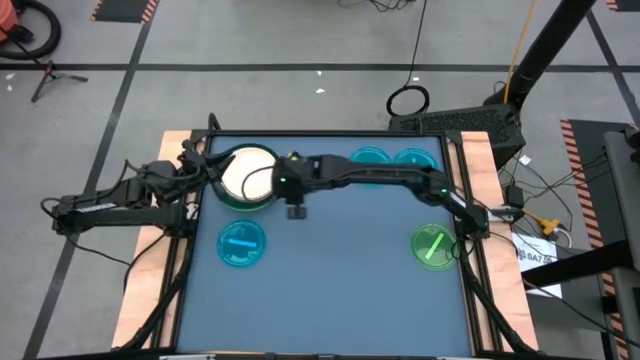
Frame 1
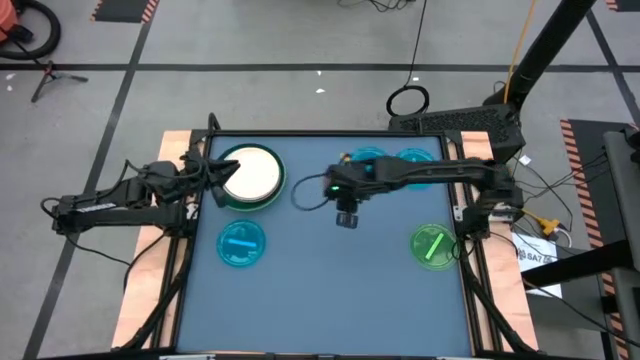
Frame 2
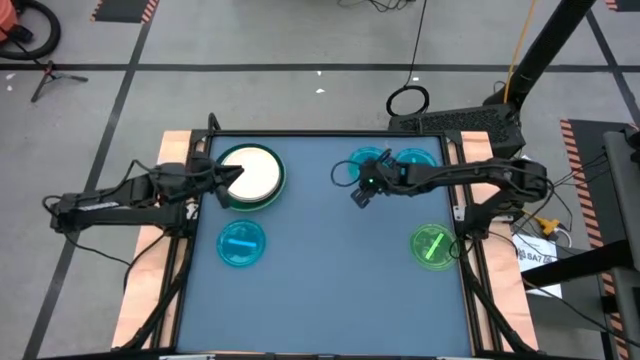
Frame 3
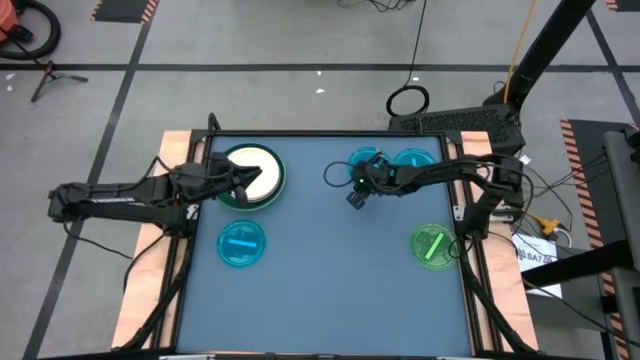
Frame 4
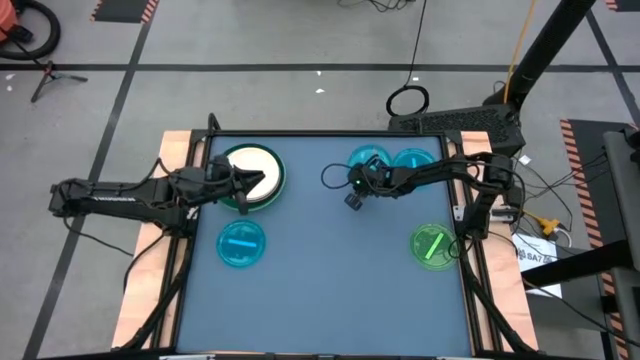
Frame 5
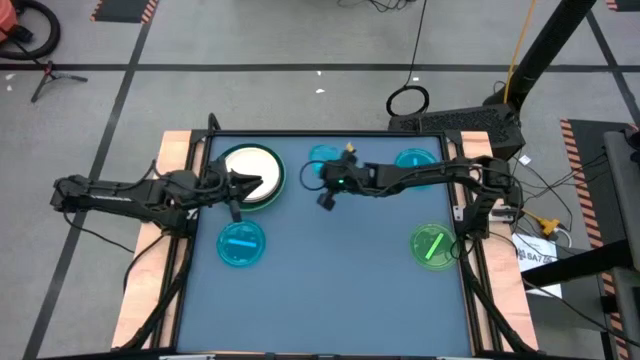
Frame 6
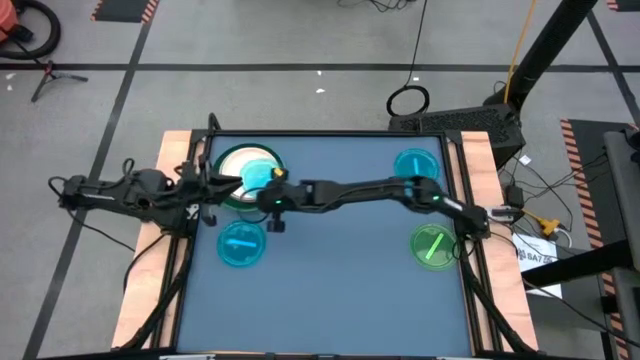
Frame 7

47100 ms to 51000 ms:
Task: Stack plastic plates
Stack the top left light blue plate on top of the light orange plate

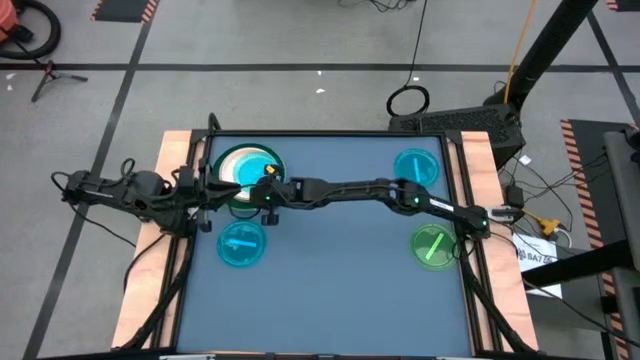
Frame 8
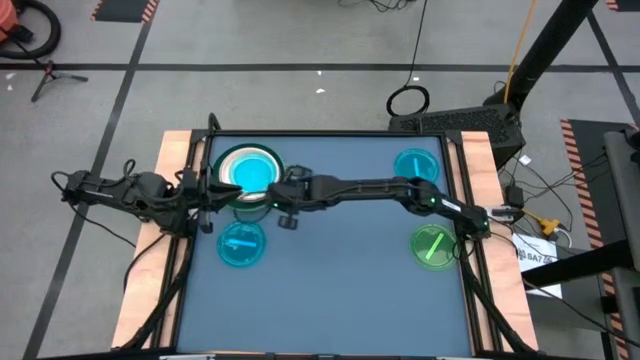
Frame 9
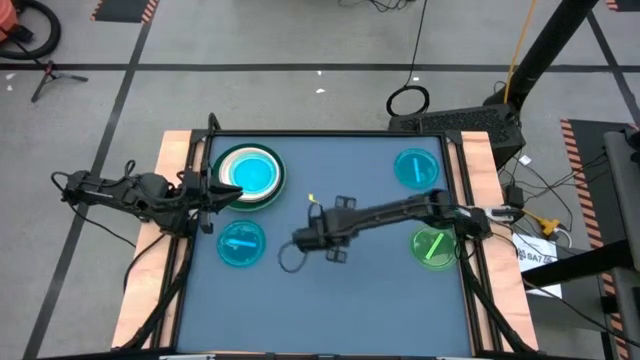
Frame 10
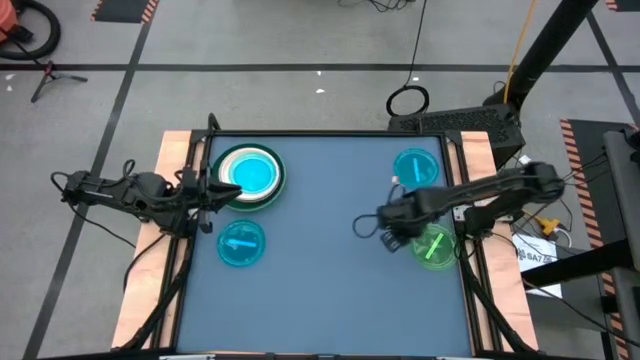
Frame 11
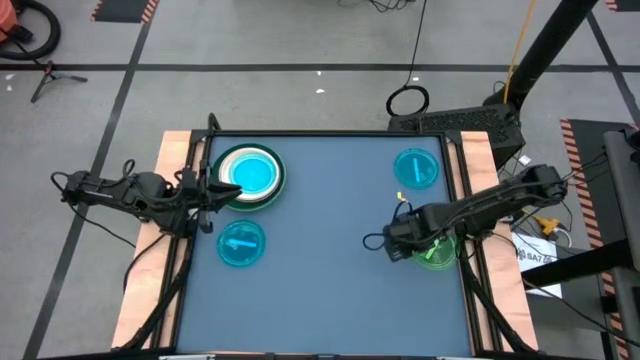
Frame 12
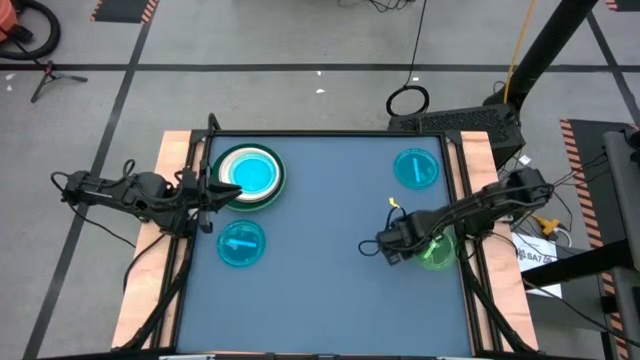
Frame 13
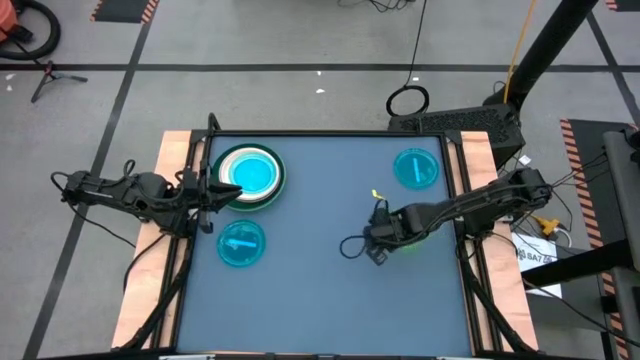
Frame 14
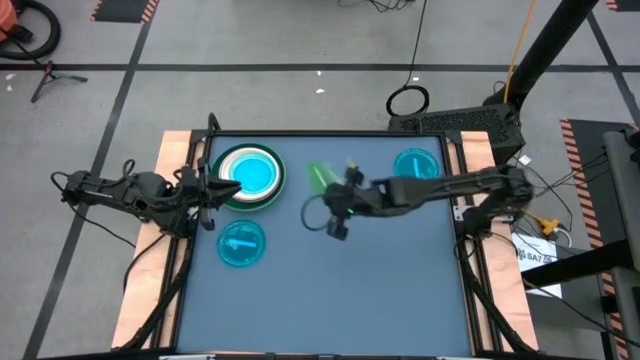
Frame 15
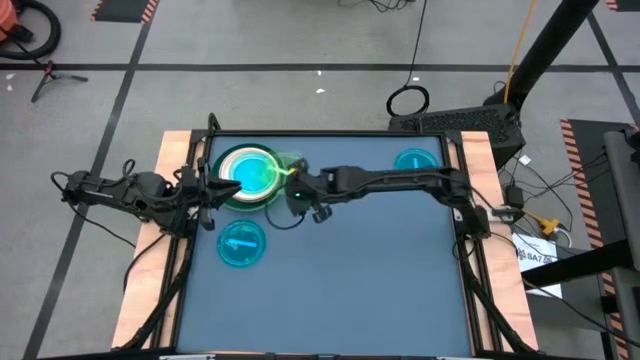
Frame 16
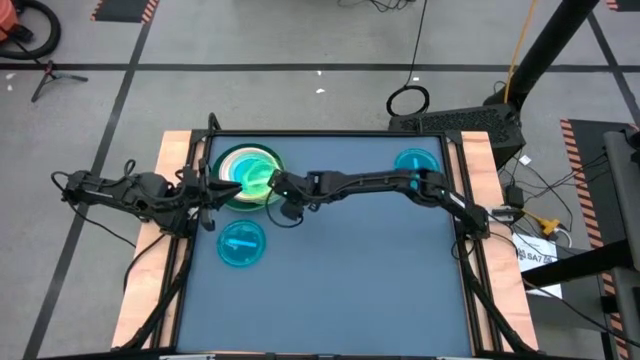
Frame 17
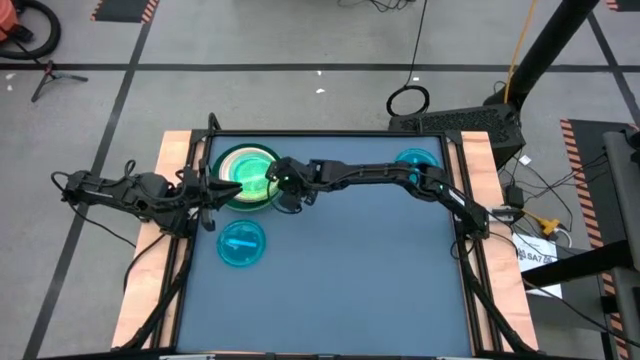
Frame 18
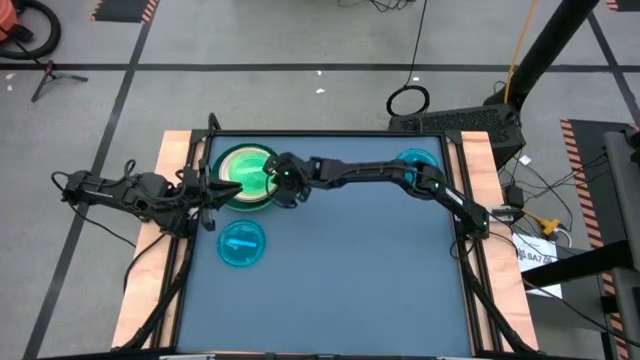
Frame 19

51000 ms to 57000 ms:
Stack the light green plate on top of the light blue plate

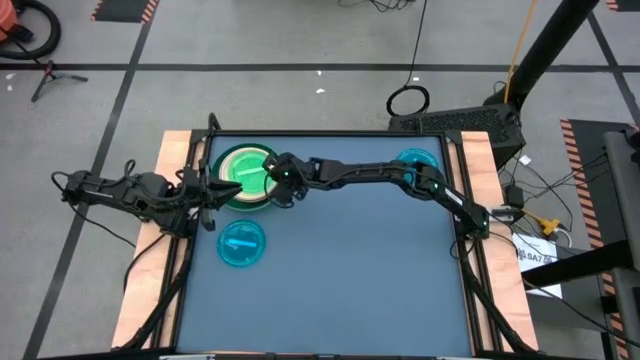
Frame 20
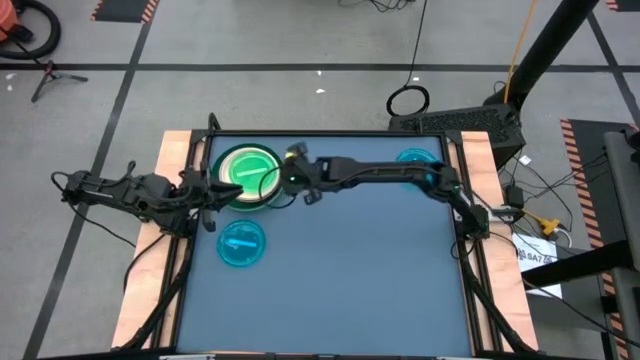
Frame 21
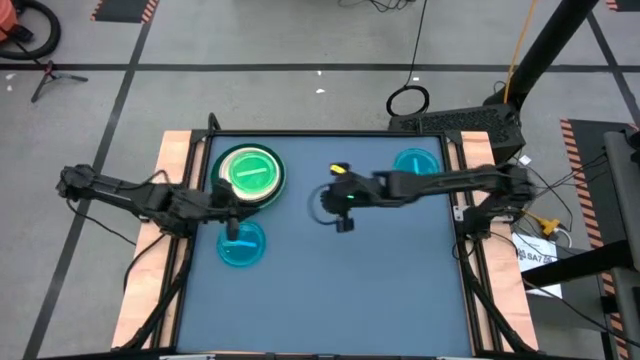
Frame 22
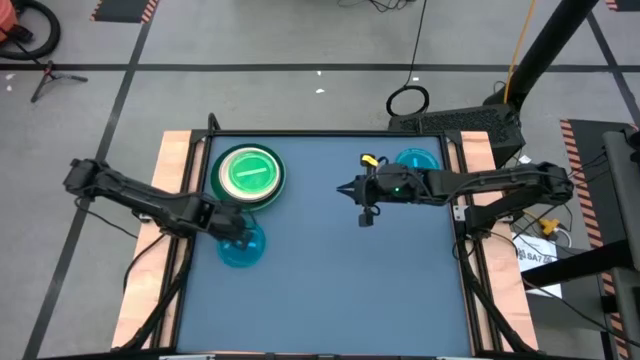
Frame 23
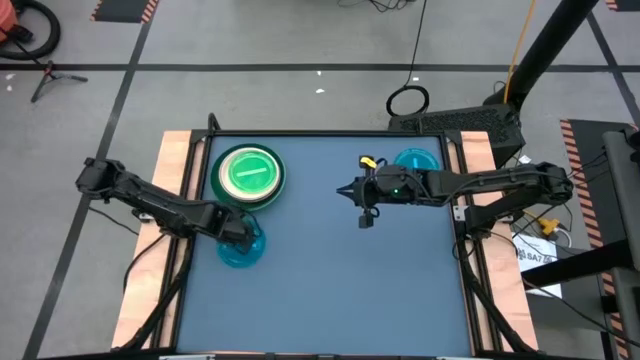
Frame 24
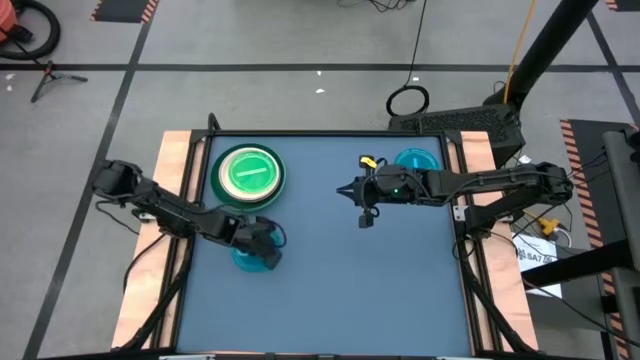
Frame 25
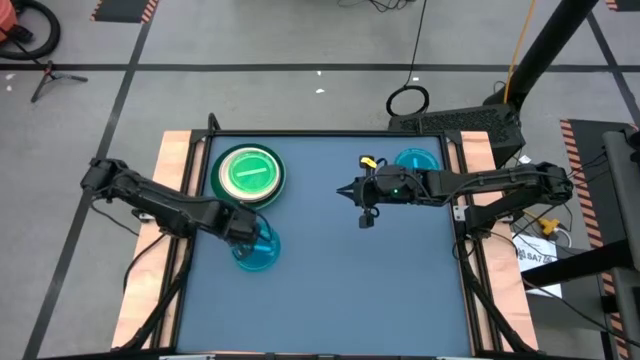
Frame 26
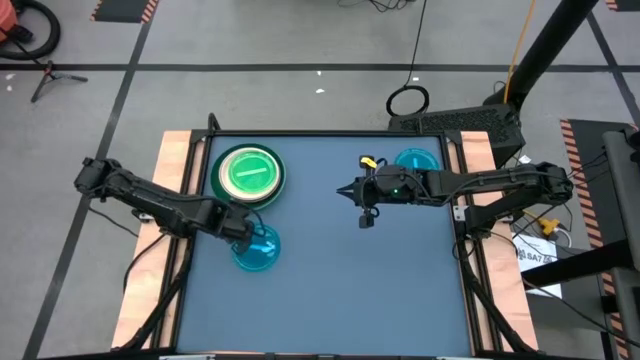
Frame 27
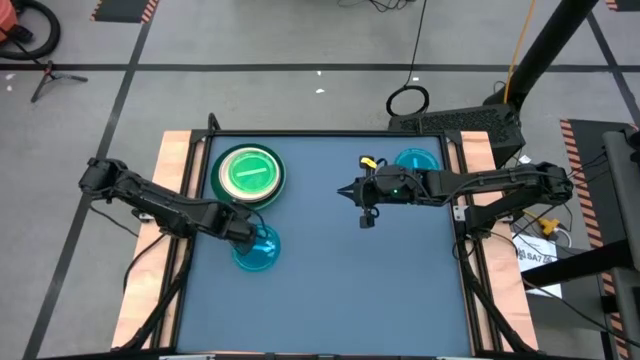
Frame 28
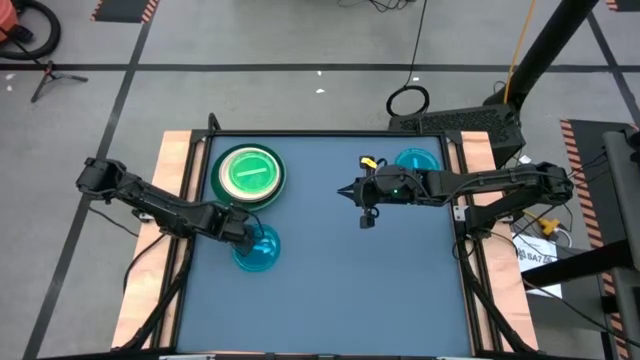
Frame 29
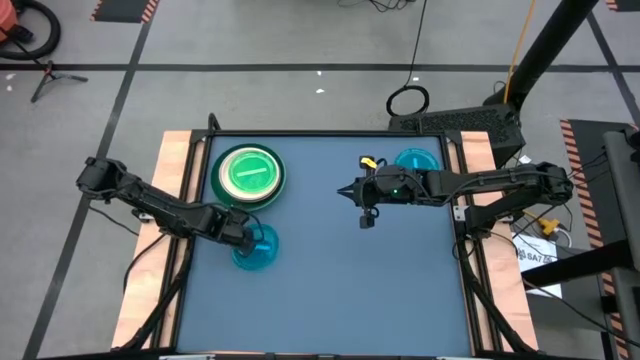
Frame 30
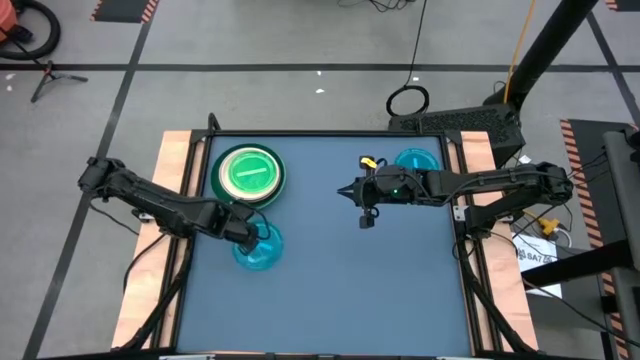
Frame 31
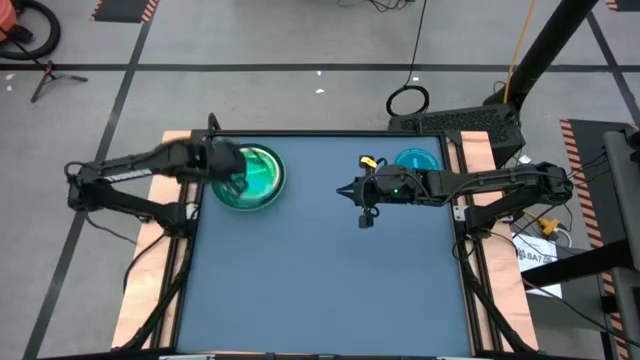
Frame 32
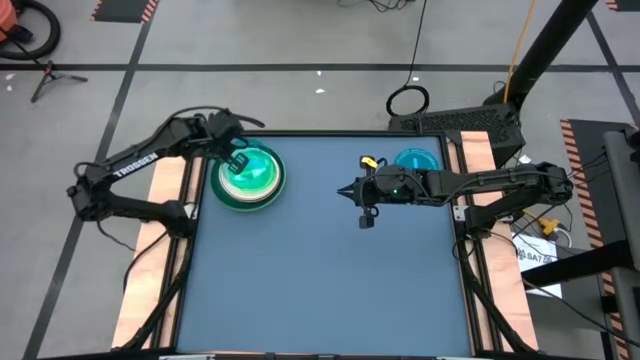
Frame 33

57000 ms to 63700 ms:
Stack the bottom light blue plate on top of the light green plate

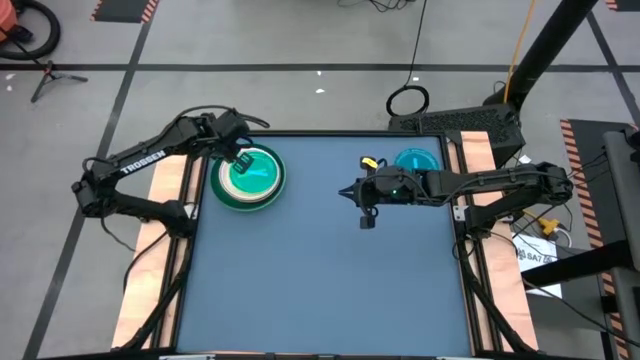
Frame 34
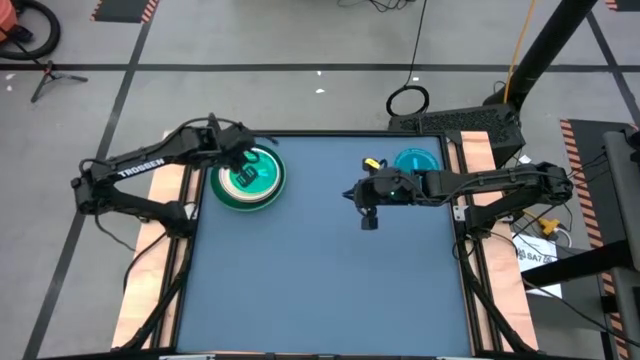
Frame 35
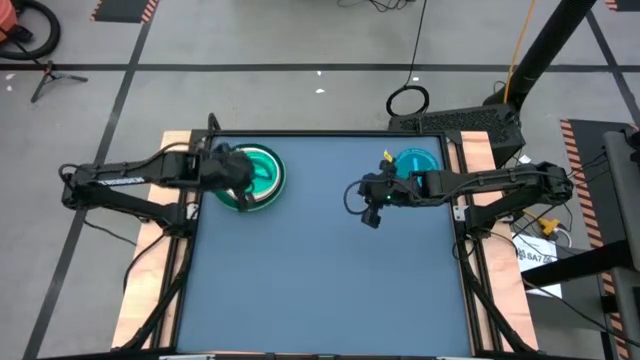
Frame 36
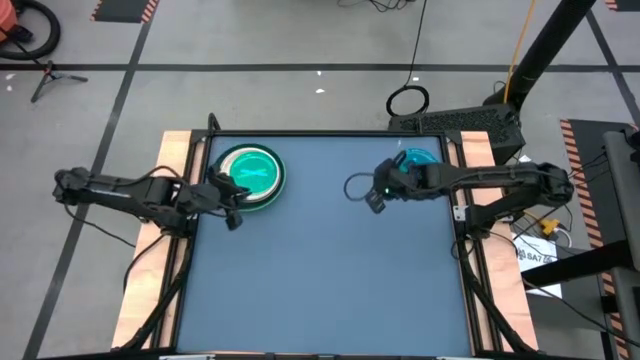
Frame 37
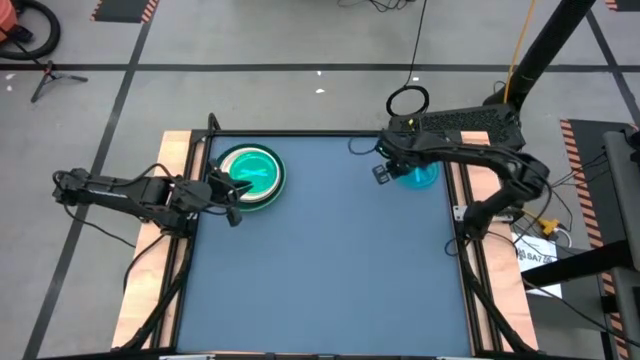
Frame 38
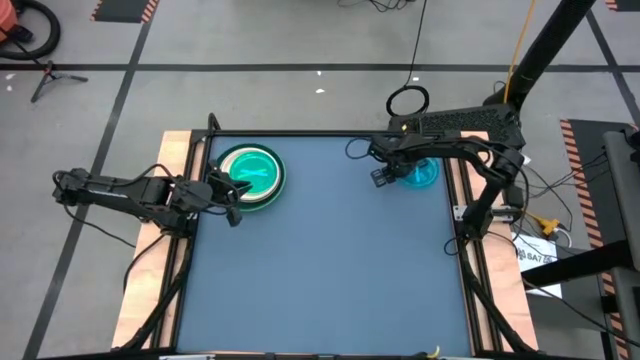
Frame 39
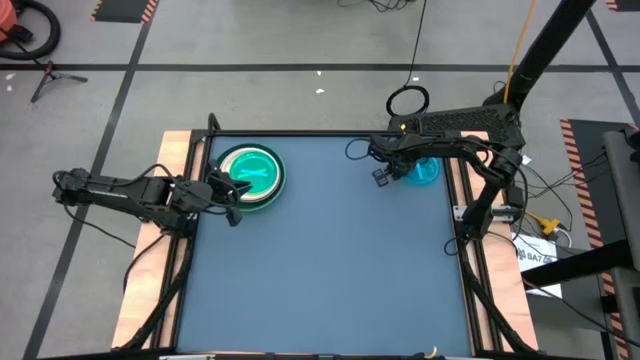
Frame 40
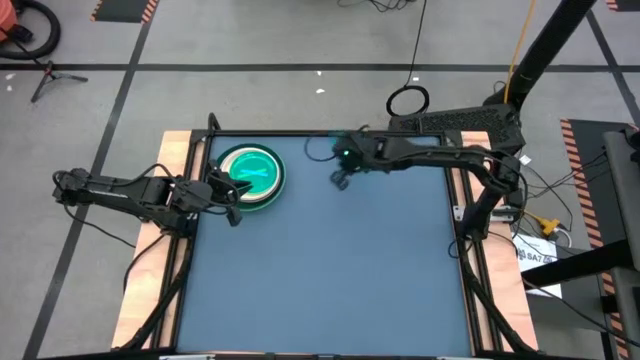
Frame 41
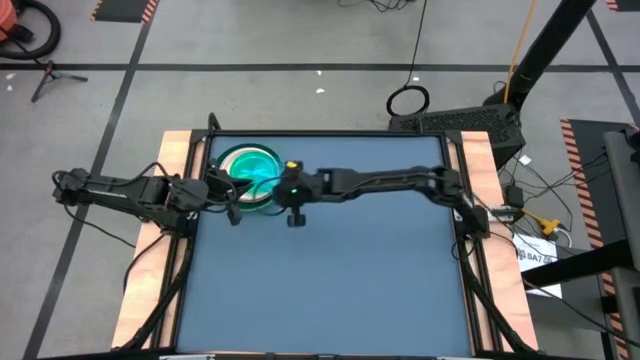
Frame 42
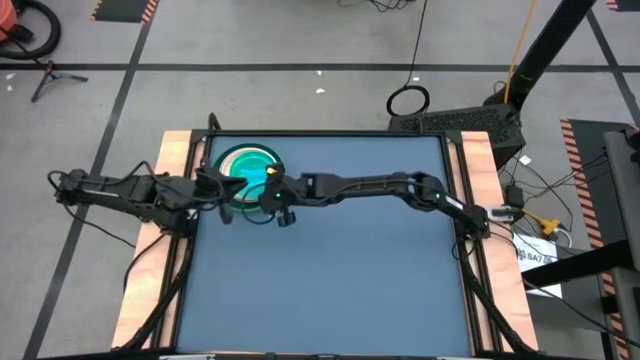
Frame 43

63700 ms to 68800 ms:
Stack the light blue plate on top of the light blue plate
